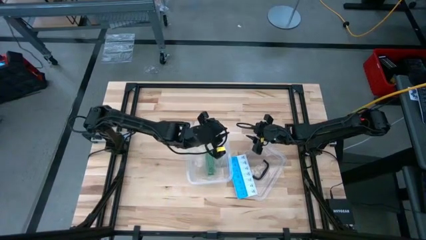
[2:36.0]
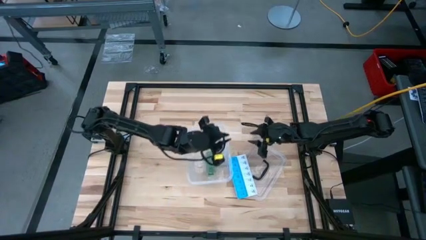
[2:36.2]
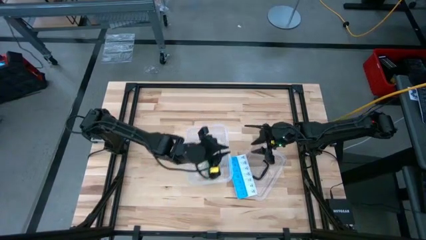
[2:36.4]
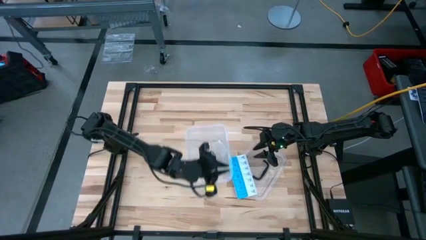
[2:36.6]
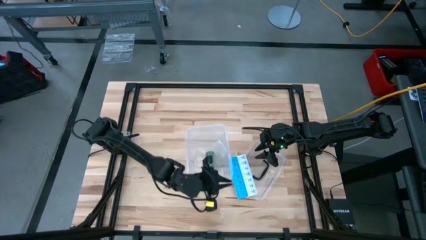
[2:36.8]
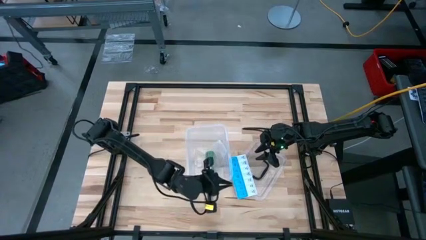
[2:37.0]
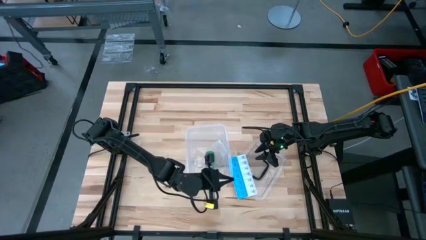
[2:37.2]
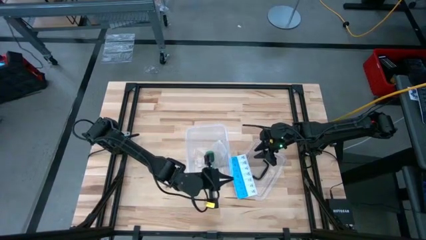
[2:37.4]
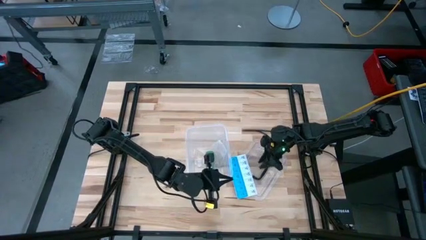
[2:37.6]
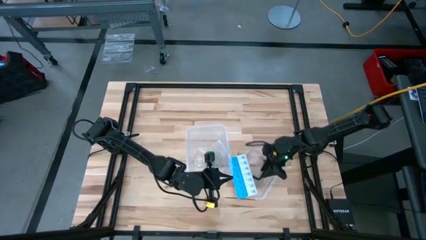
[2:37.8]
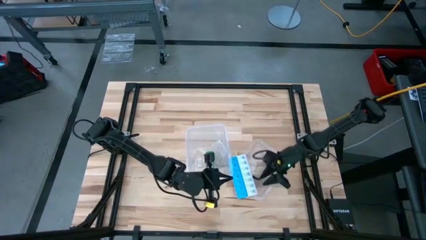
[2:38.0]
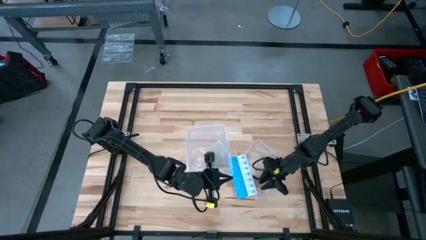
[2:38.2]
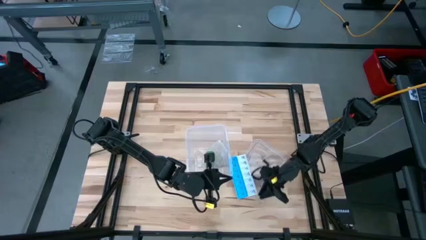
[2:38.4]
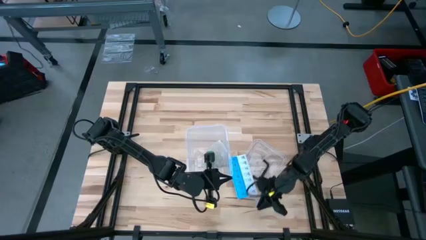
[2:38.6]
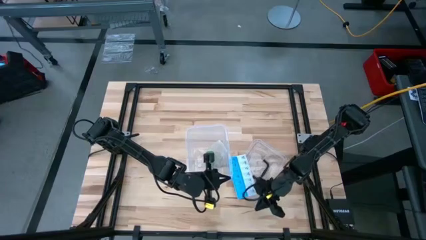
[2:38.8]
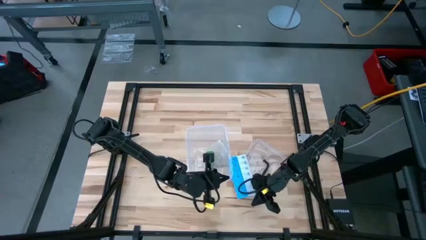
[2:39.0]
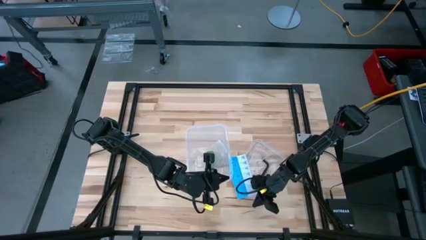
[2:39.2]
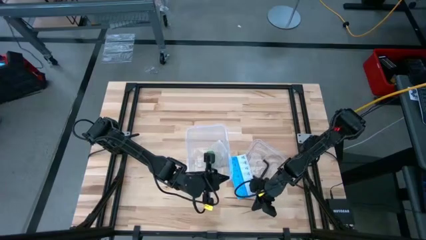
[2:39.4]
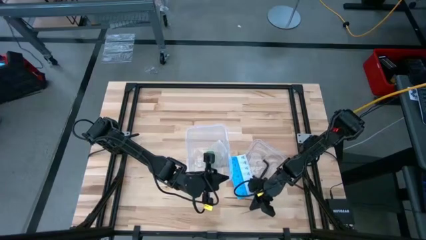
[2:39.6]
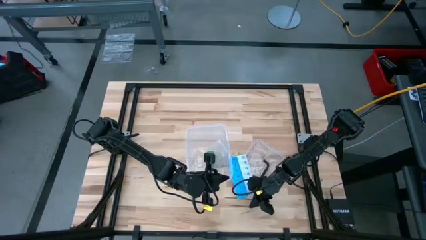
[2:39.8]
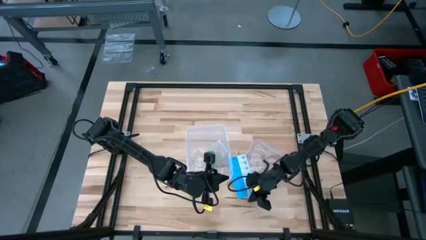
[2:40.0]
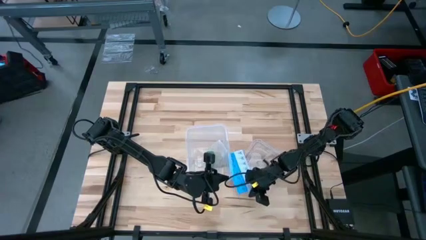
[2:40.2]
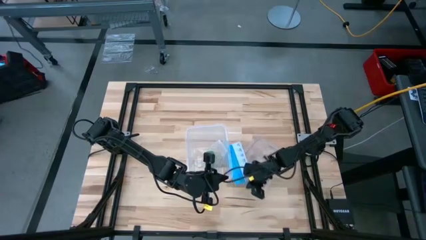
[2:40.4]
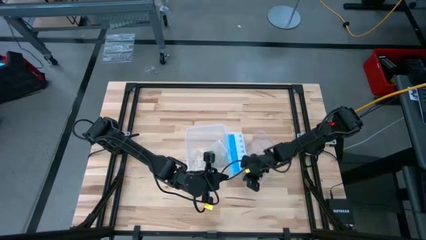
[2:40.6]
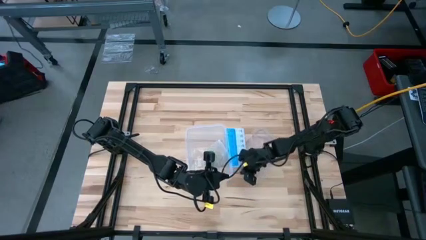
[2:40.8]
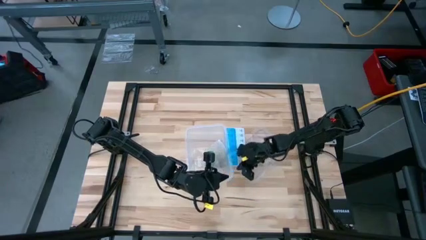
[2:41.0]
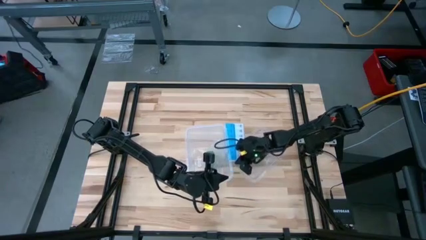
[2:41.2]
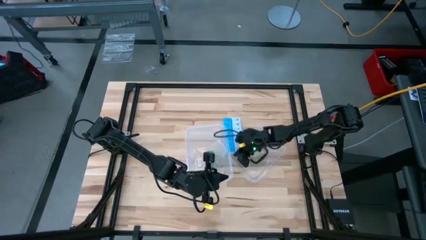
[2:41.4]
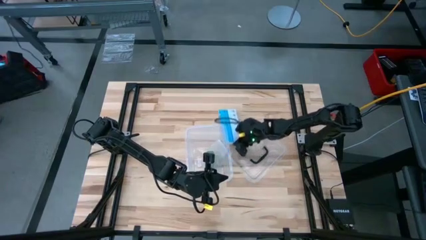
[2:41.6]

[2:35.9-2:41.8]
Task: Roll bandage
Move the blue medicine organizer to the top center of the table

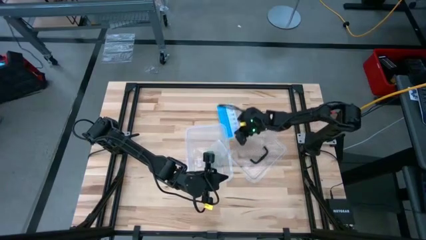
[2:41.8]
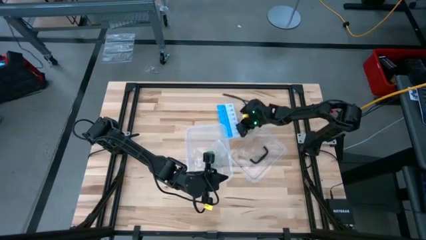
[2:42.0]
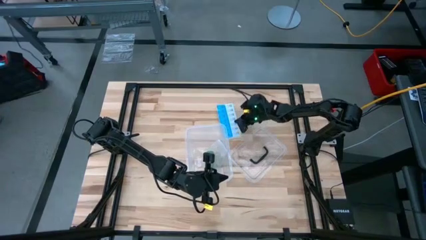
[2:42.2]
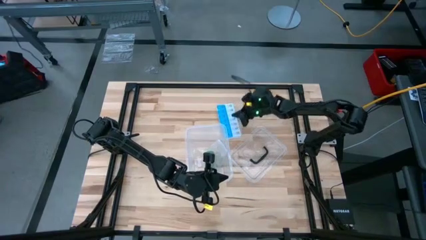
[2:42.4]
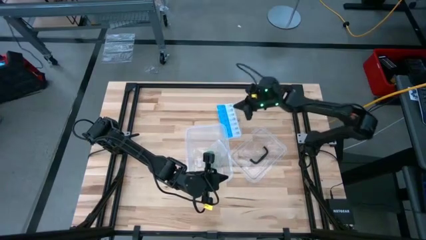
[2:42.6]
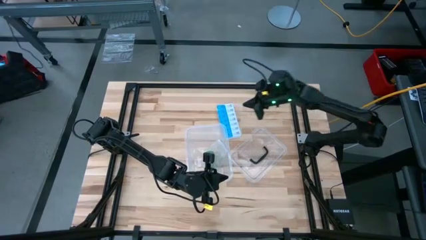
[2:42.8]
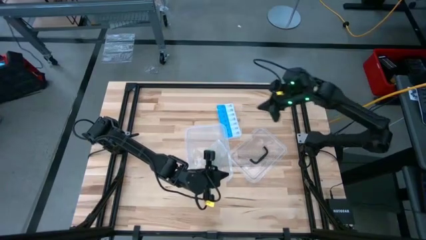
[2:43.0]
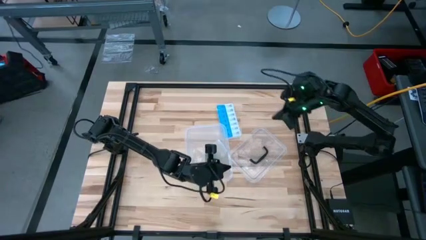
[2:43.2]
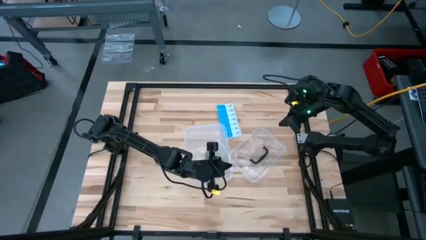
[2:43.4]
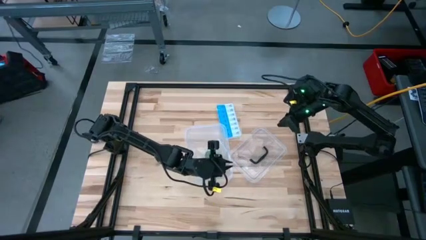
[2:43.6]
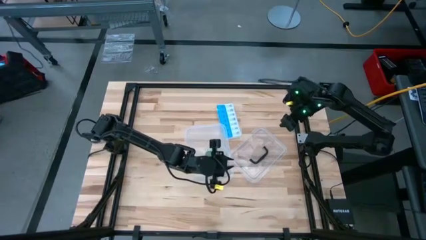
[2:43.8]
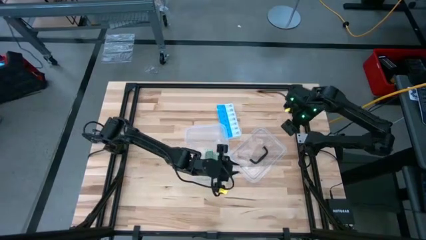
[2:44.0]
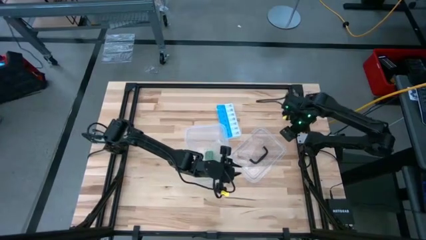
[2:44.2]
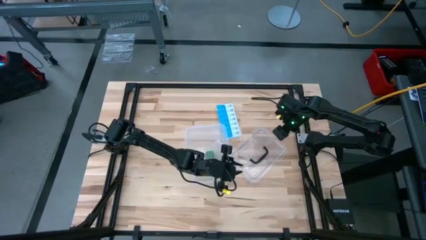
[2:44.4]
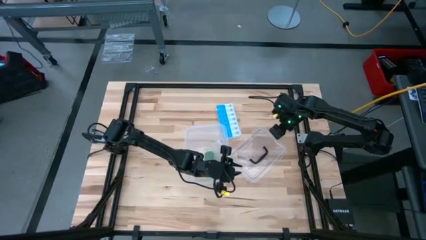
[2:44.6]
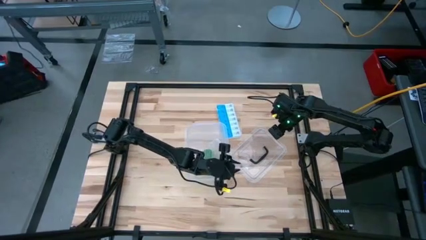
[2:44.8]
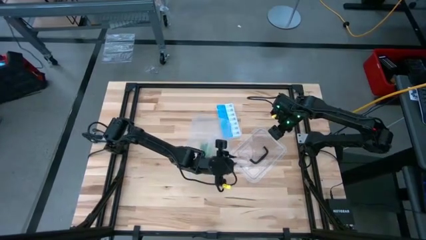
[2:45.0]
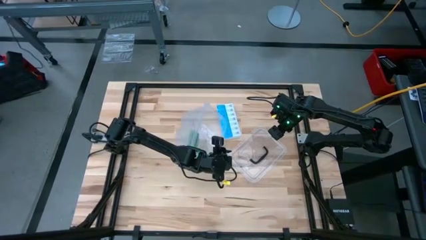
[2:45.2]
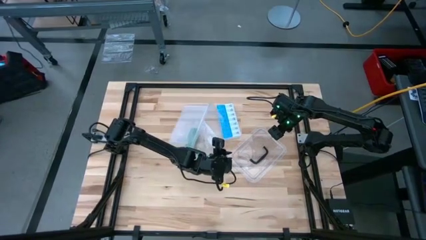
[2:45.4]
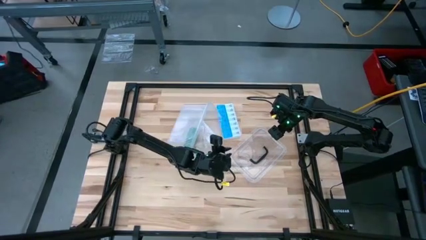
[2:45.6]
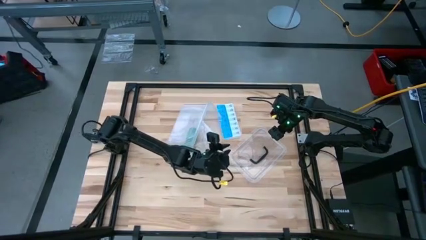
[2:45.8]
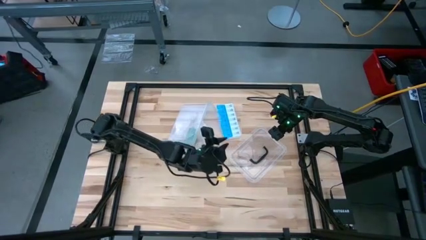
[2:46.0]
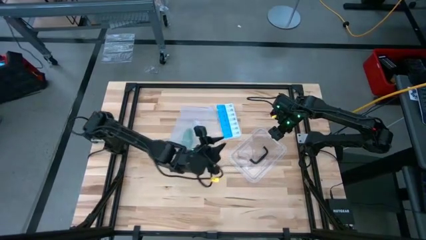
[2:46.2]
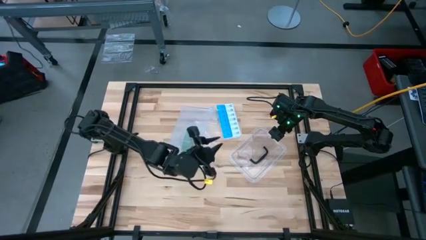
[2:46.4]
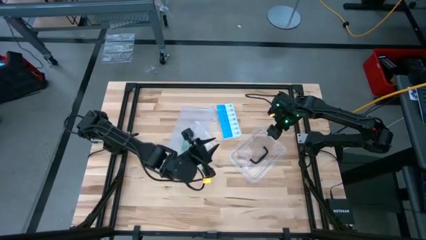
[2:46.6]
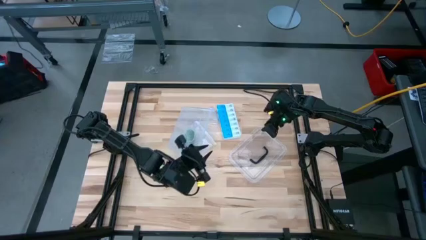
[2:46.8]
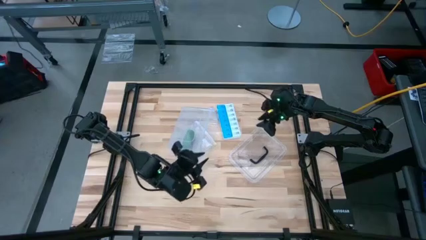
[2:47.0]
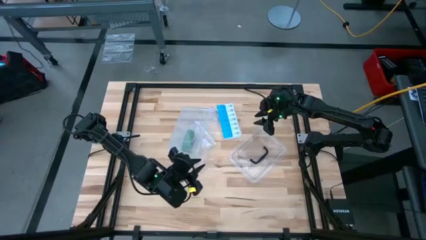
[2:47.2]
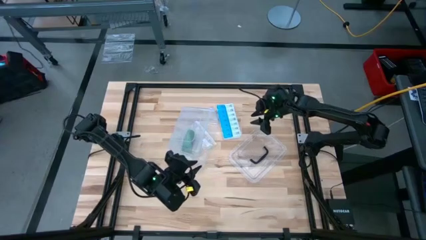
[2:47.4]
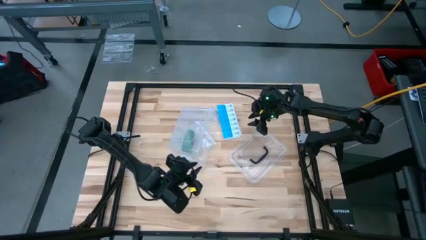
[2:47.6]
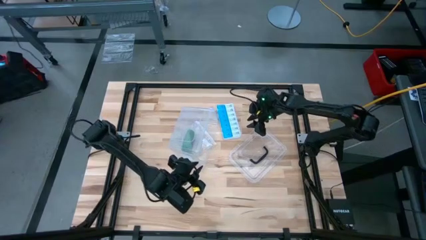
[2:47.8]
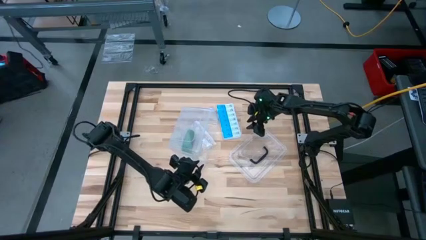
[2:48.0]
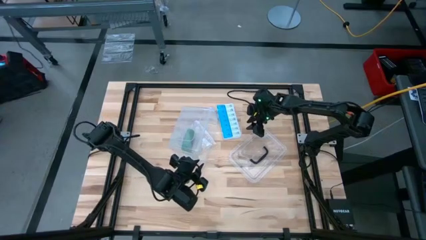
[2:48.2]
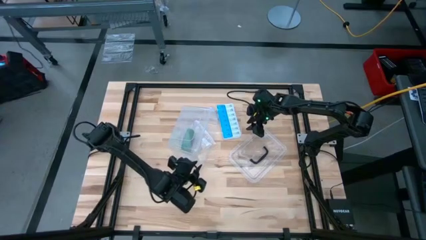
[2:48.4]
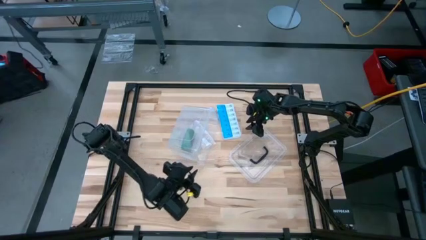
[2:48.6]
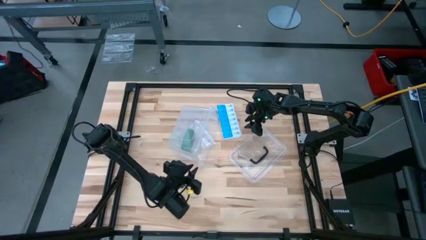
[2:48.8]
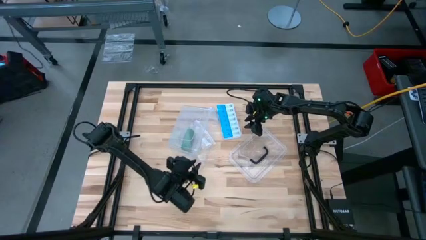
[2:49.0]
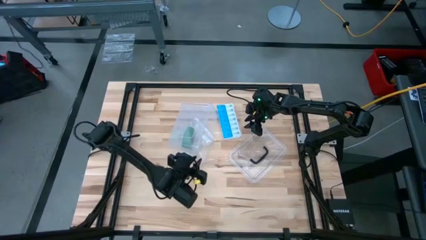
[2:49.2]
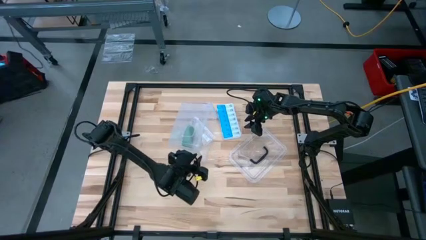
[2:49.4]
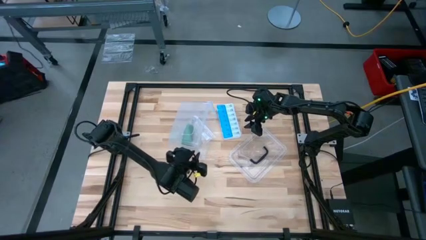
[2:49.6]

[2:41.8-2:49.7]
Close the transparent bin

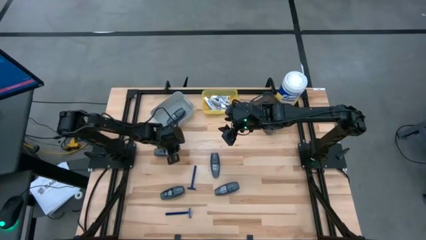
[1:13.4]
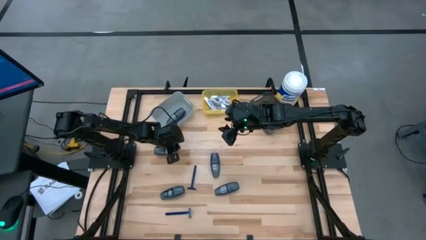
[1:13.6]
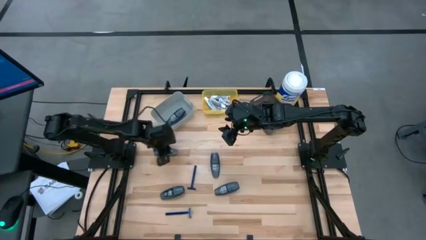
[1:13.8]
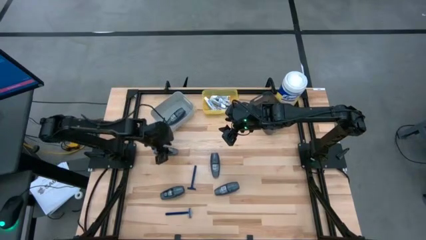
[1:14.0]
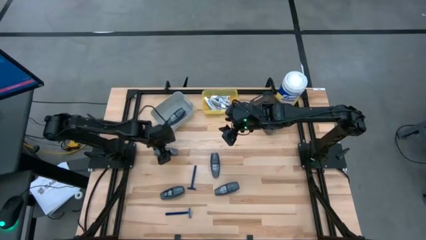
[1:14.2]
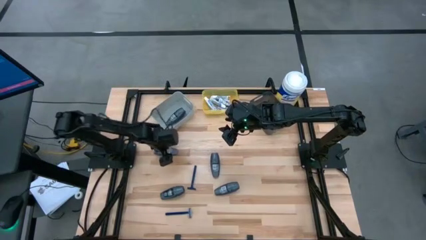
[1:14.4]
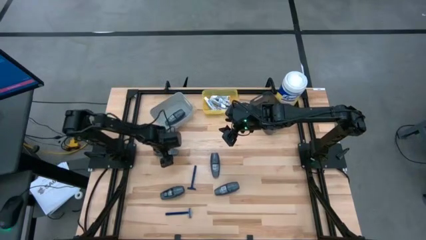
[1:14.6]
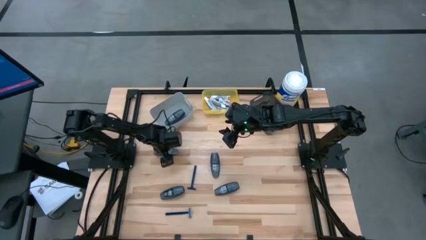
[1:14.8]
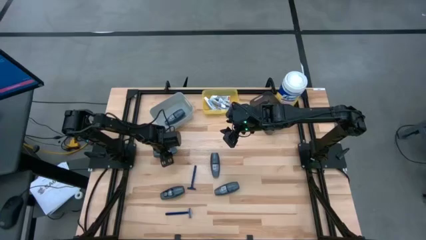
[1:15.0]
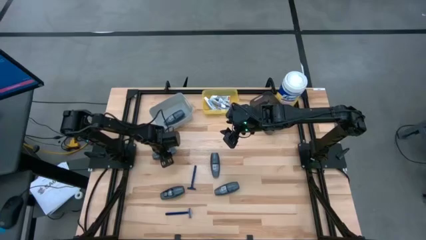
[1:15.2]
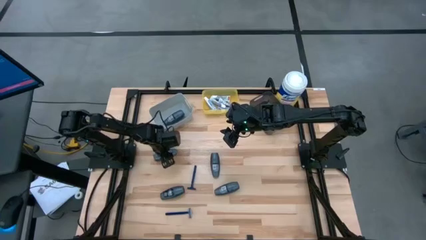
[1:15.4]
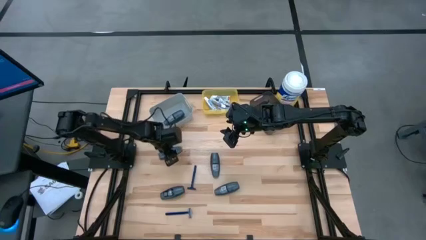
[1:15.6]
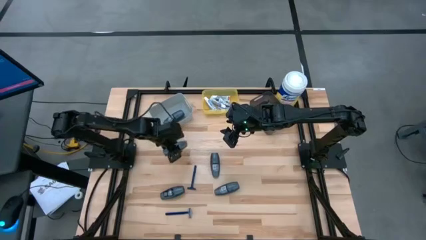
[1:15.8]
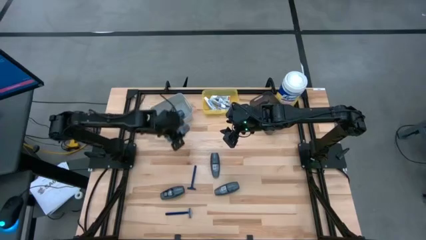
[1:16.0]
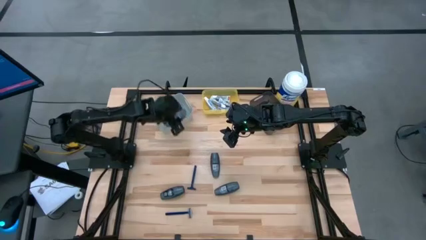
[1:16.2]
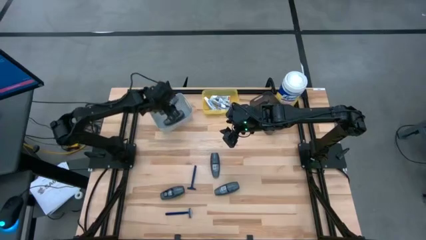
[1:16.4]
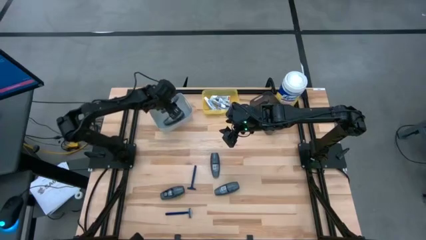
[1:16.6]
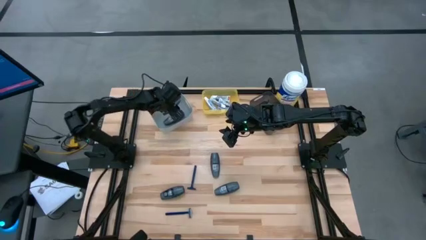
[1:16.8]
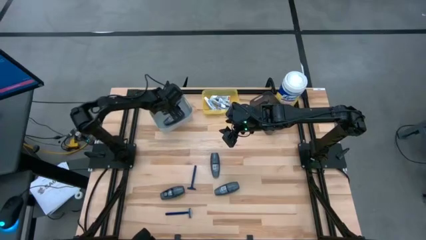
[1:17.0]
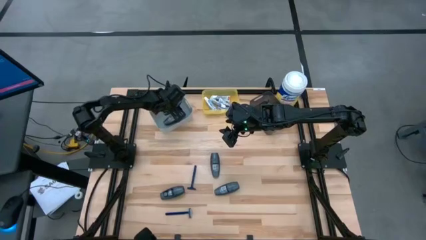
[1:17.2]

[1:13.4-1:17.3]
Task: Pick & Place Travel size toiletries
Put the gray deodorant into the gray bin
